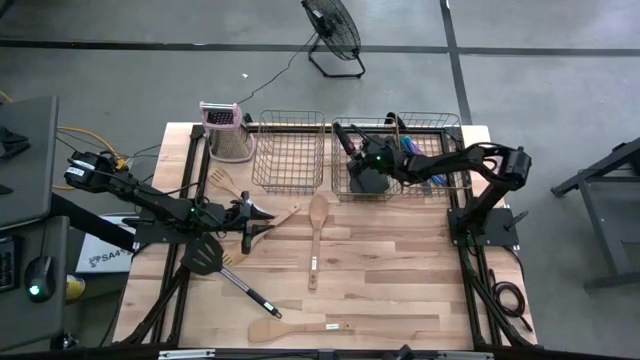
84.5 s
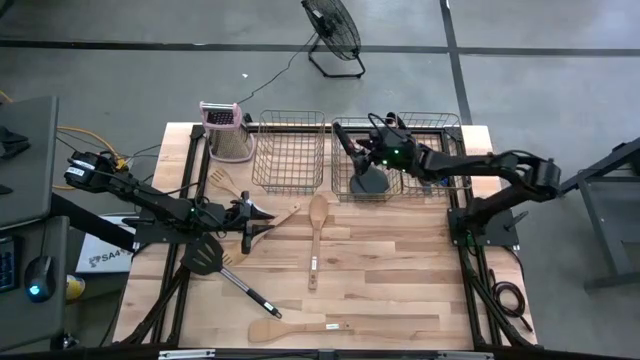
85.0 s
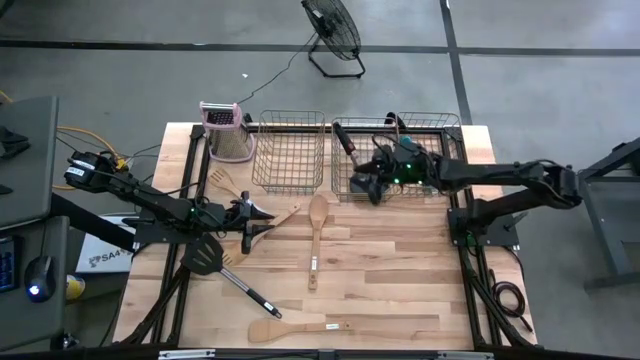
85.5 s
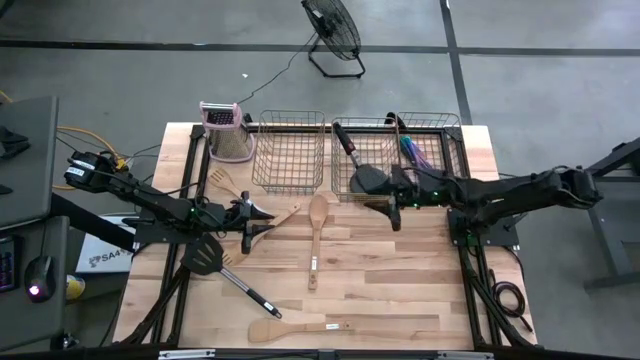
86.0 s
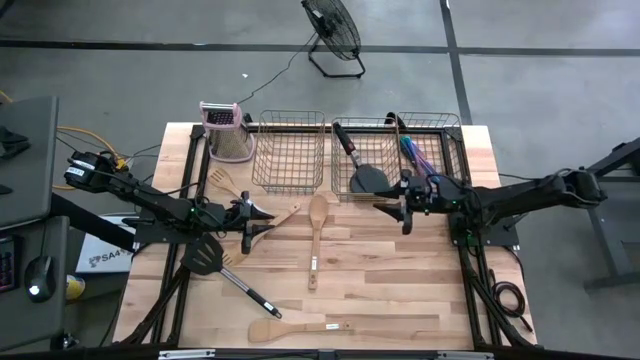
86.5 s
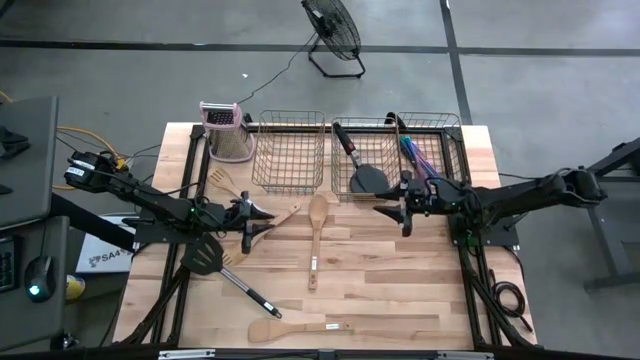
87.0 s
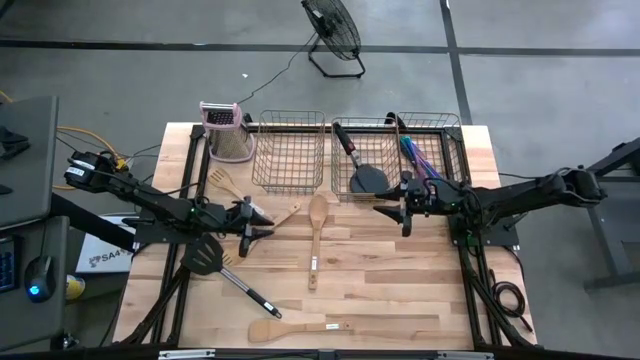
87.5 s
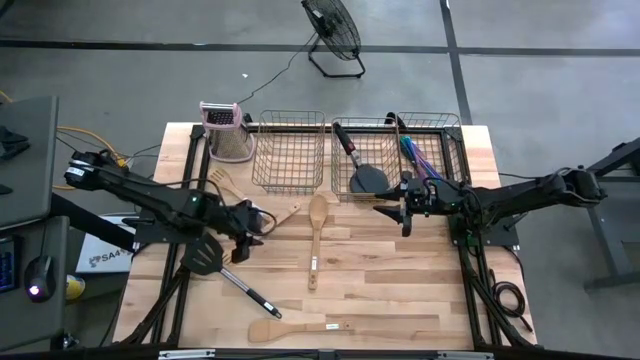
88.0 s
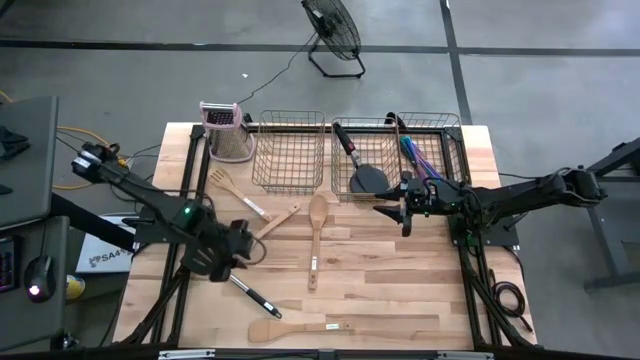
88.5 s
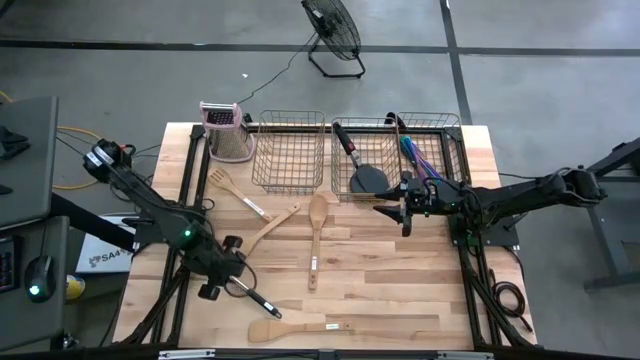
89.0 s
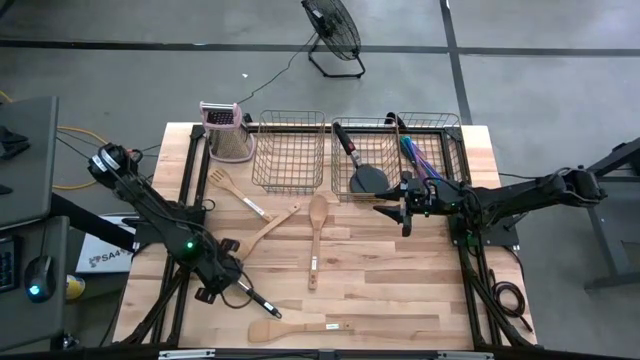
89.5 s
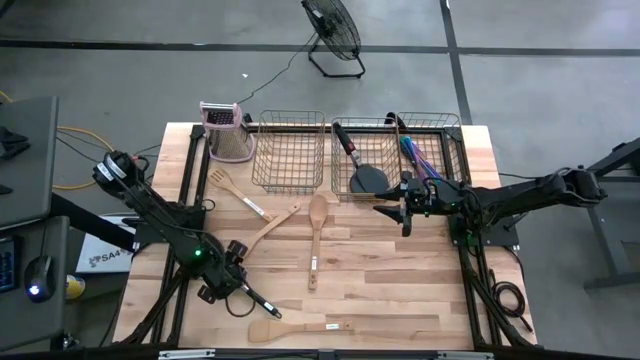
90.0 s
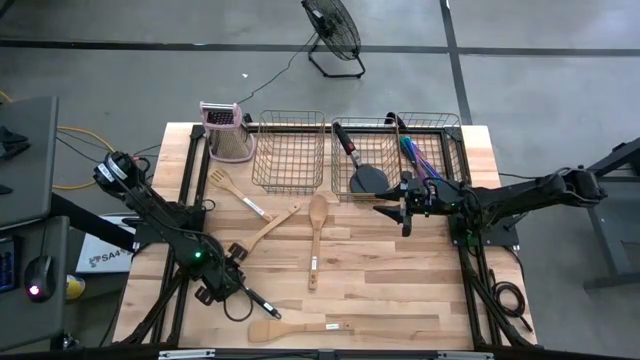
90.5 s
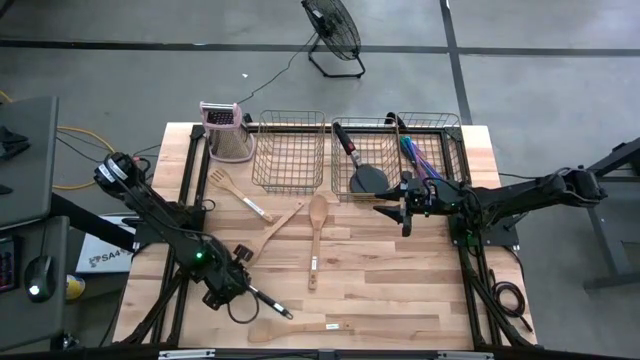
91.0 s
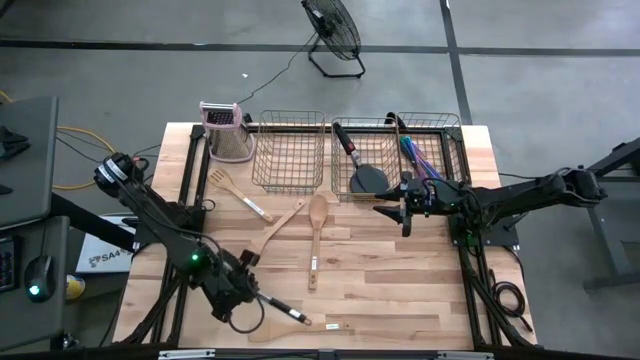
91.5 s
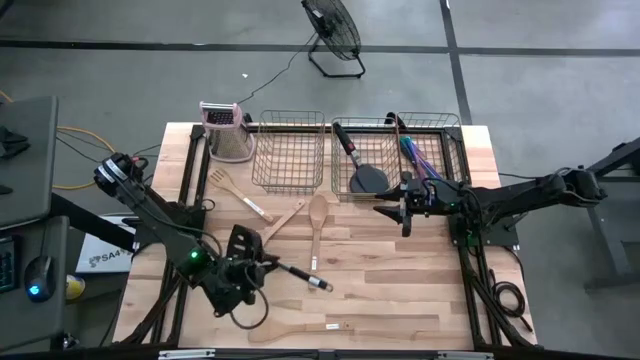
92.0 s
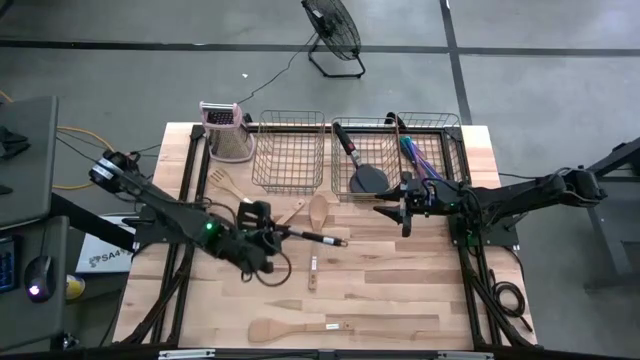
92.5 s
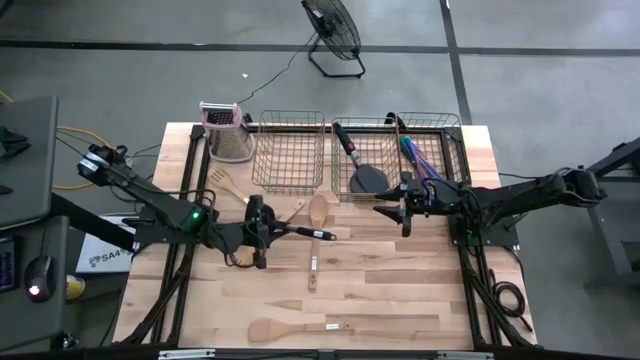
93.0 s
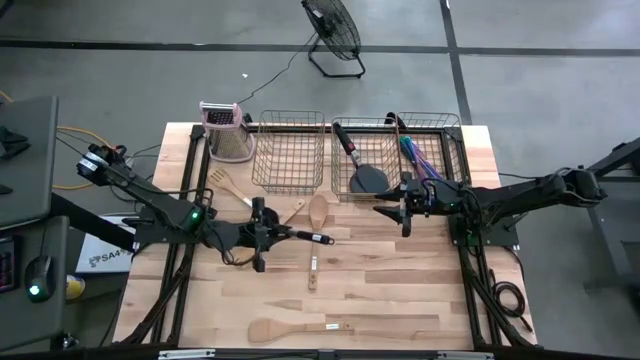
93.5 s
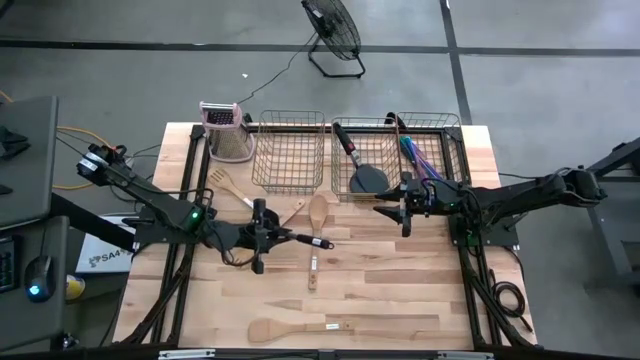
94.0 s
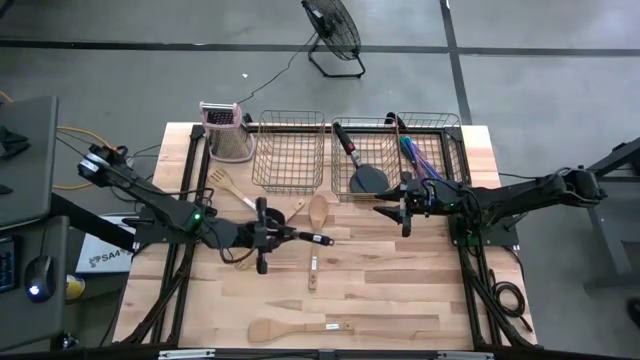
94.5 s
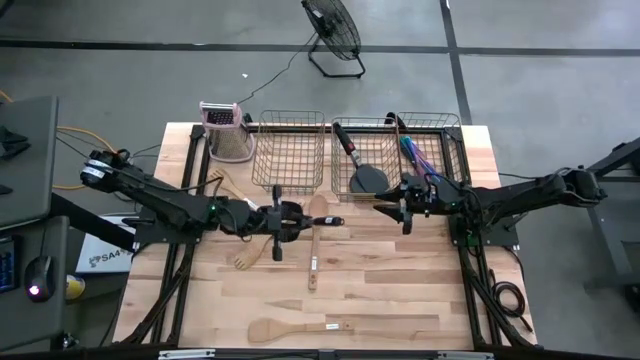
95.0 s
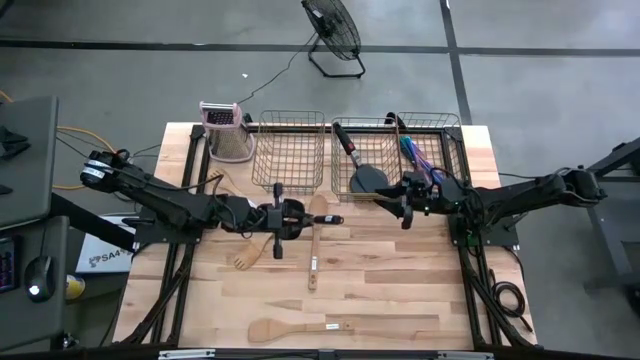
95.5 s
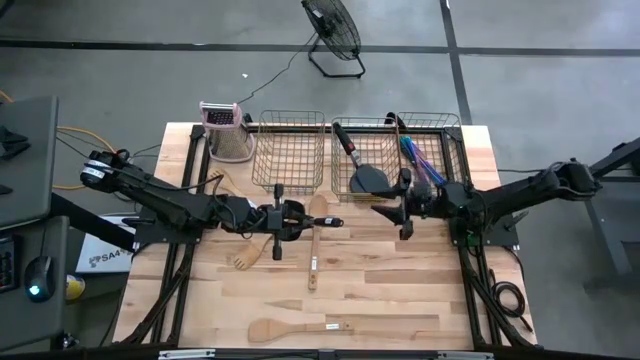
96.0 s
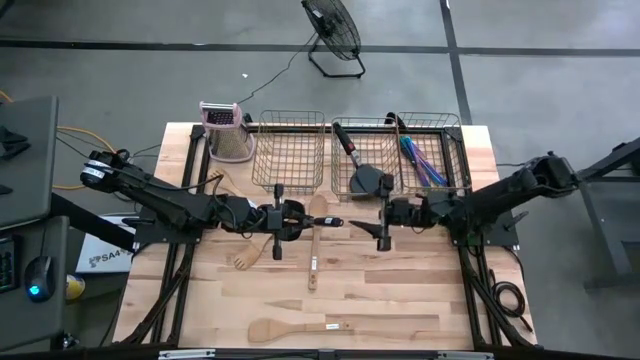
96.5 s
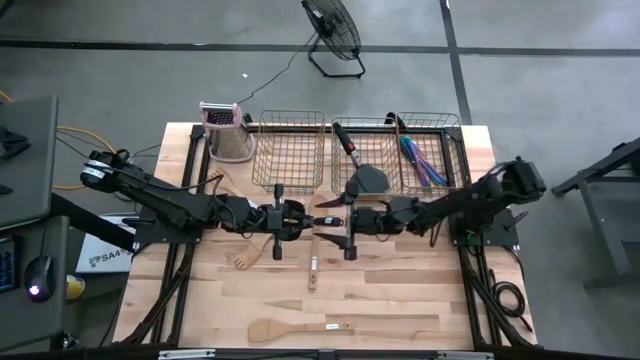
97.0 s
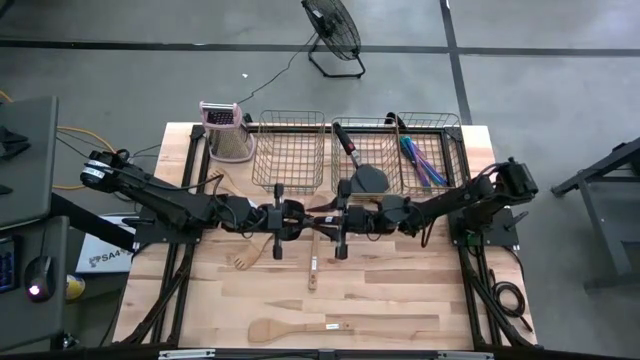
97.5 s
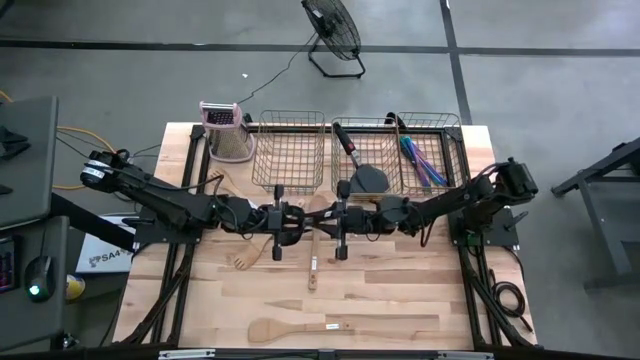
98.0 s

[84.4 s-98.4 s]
Task: Pick & Place Kitchen Items
Put the black slotted turner spatula into the middle mesh basket

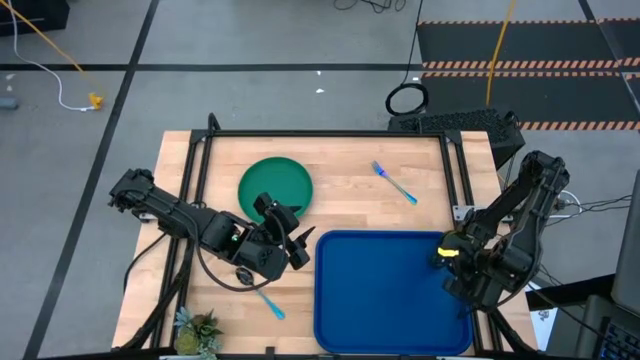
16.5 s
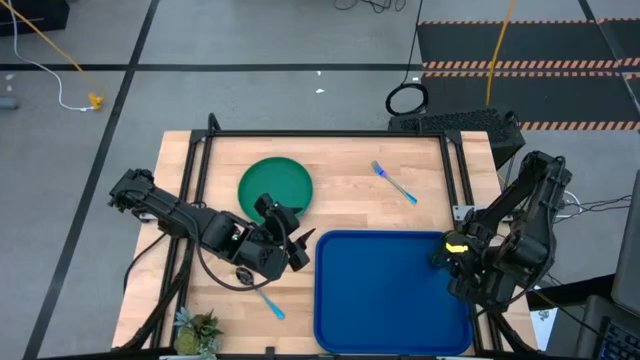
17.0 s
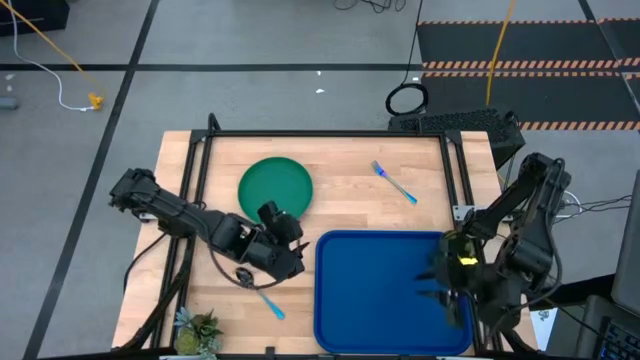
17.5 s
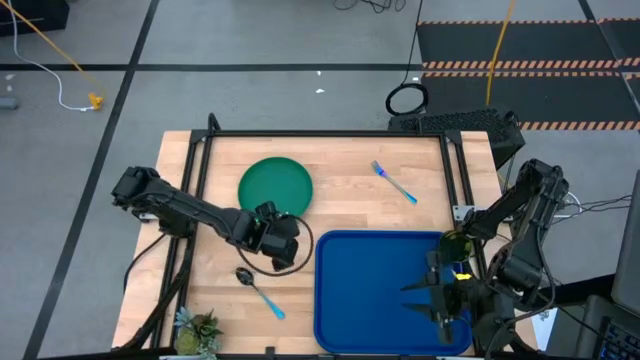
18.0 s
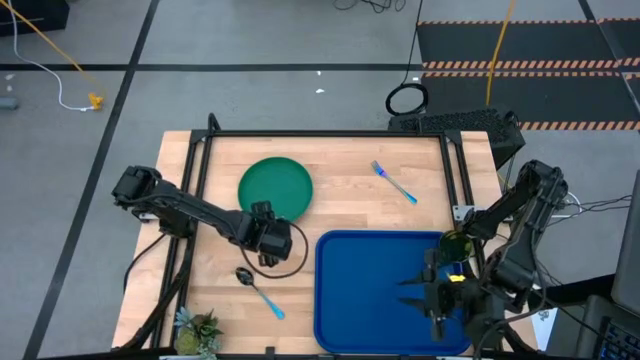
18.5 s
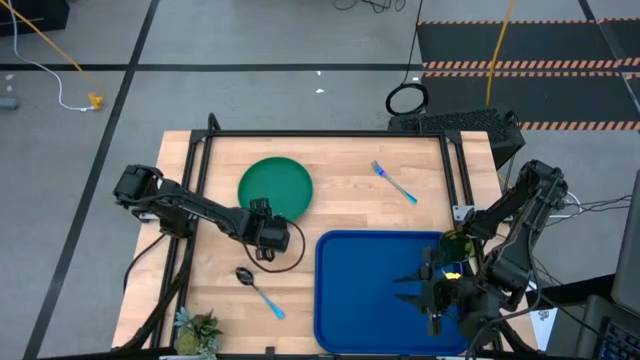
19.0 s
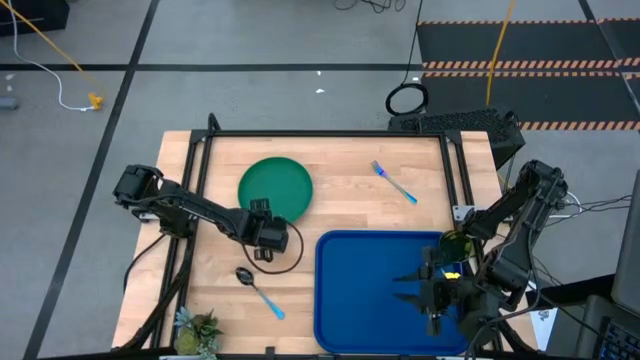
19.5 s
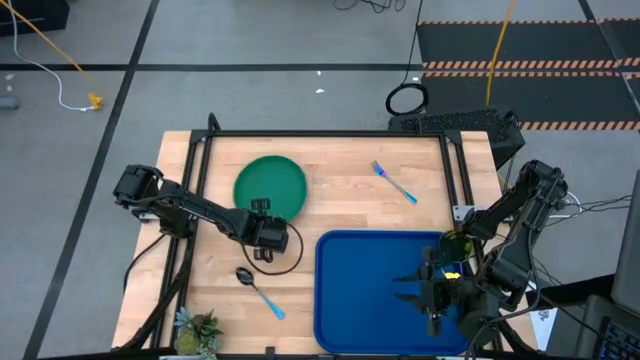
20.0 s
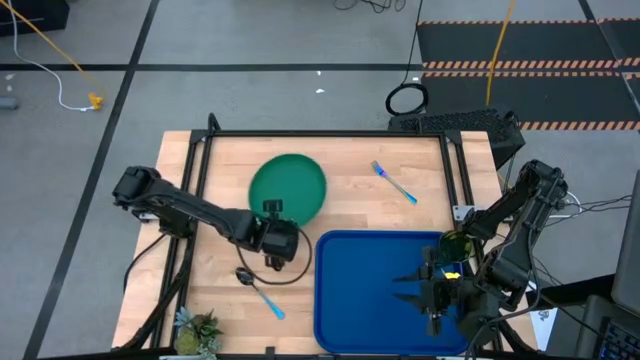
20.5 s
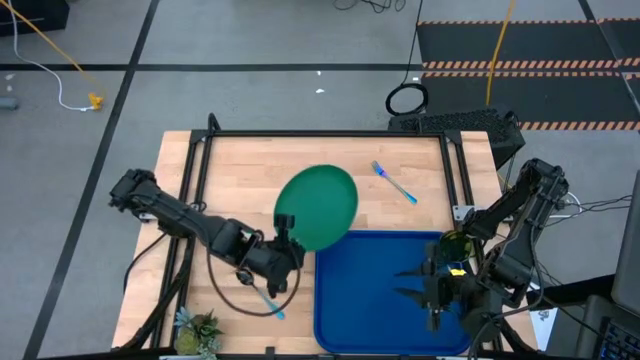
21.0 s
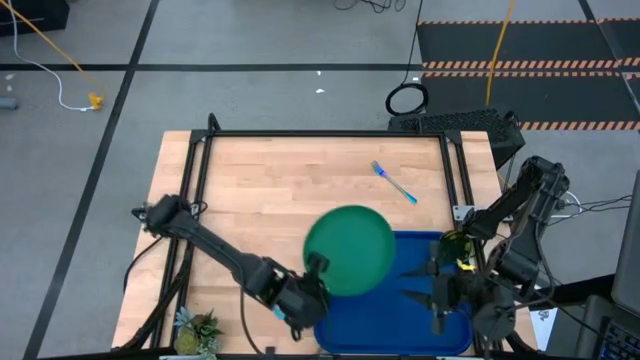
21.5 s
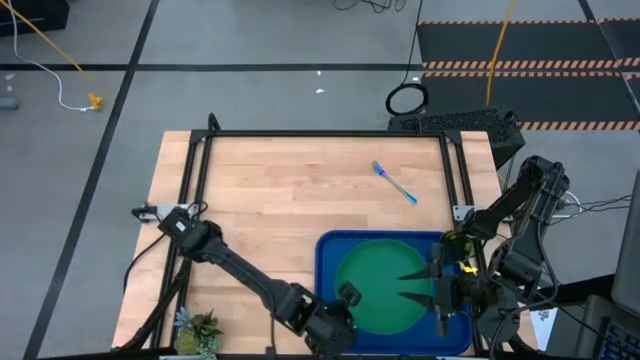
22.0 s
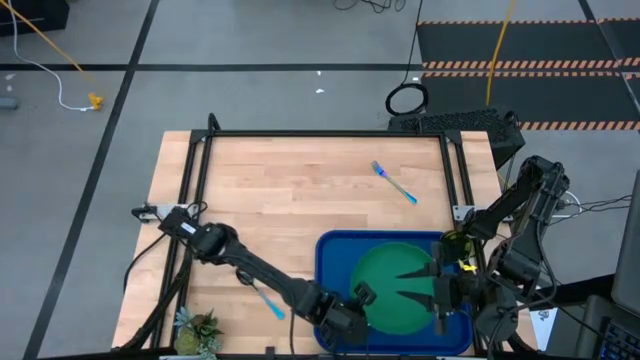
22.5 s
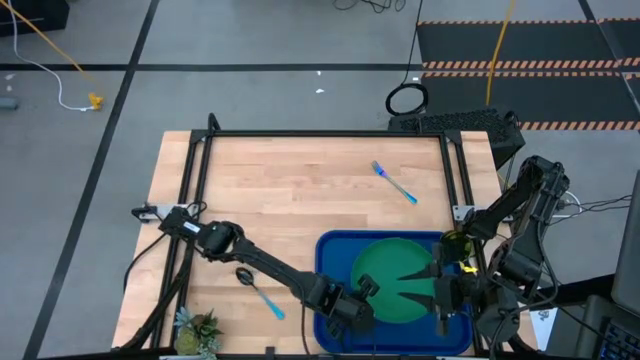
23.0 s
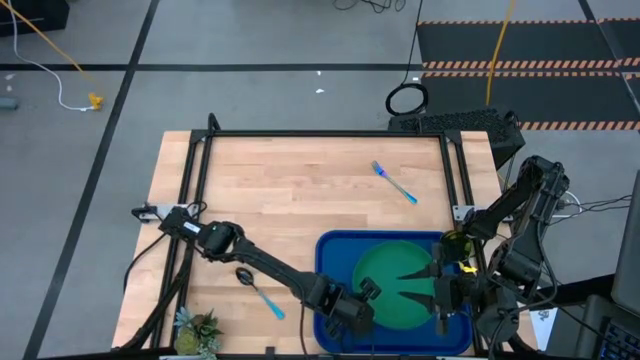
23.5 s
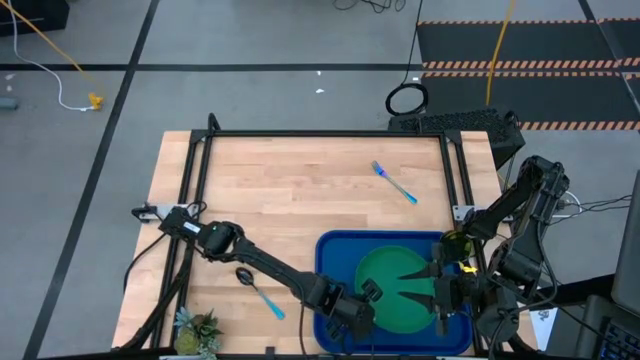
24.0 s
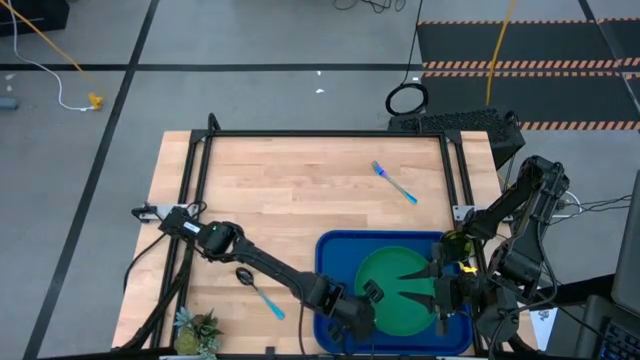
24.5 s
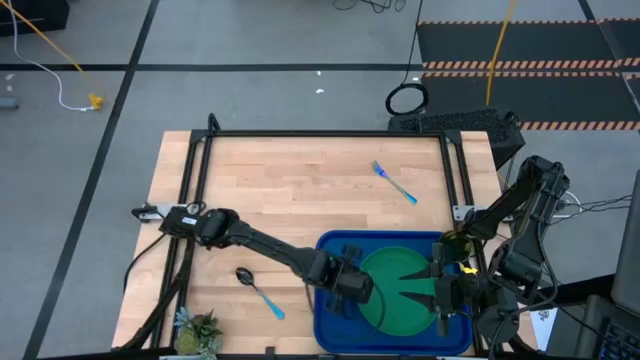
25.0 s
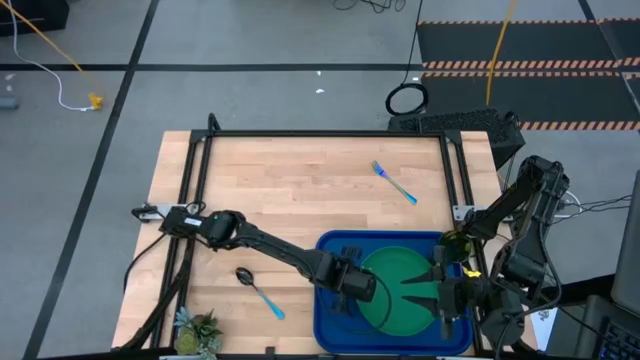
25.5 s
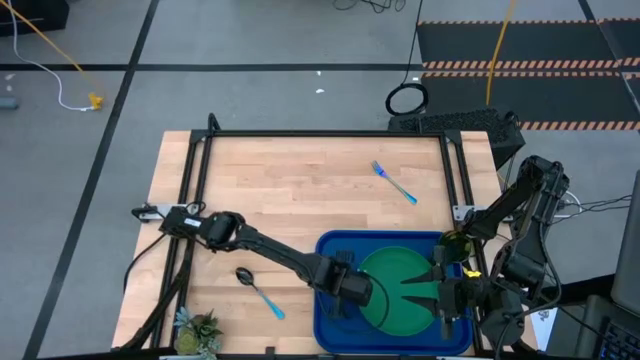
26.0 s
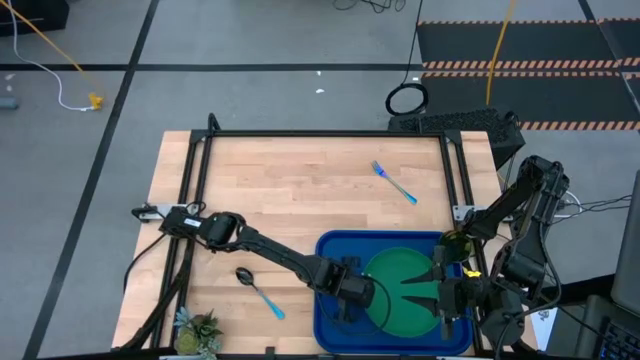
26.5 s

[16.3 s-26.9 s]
Task: Pick and place plate/cup/fork/spoon on tray
Put the green plate in the middle of the blue tray
